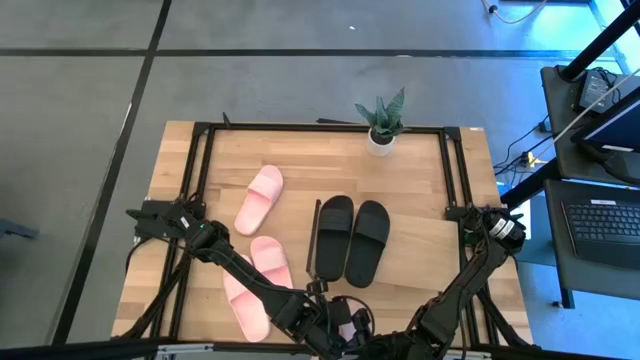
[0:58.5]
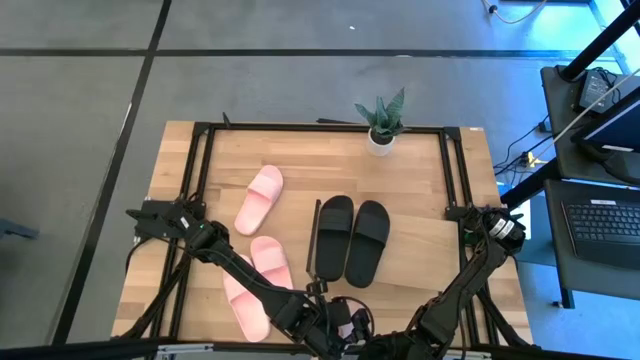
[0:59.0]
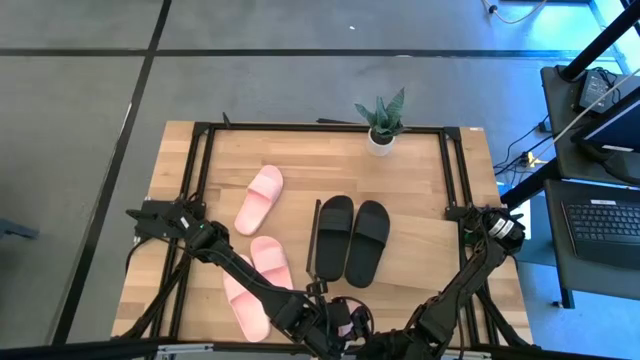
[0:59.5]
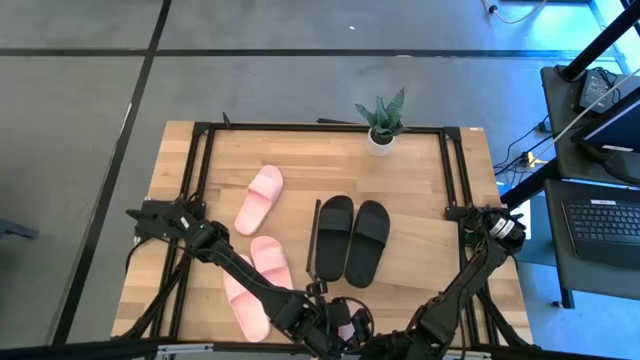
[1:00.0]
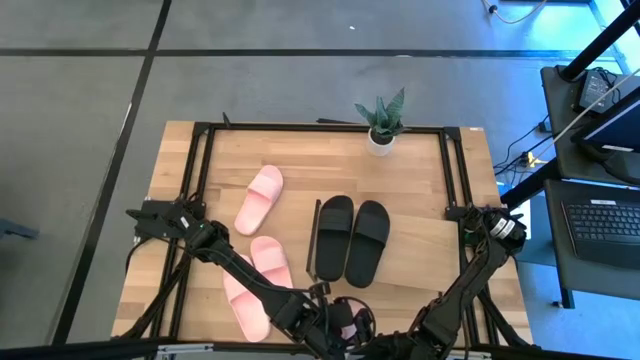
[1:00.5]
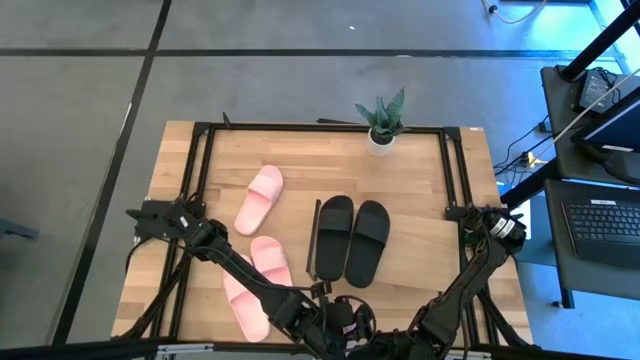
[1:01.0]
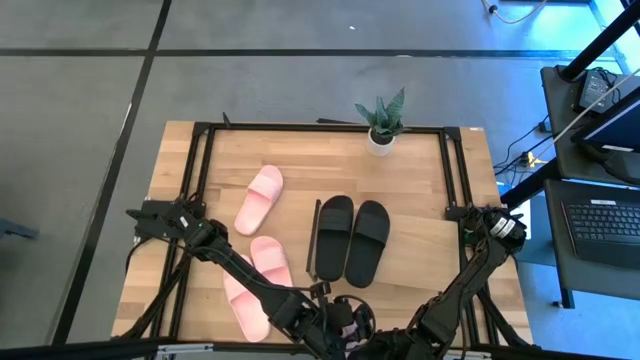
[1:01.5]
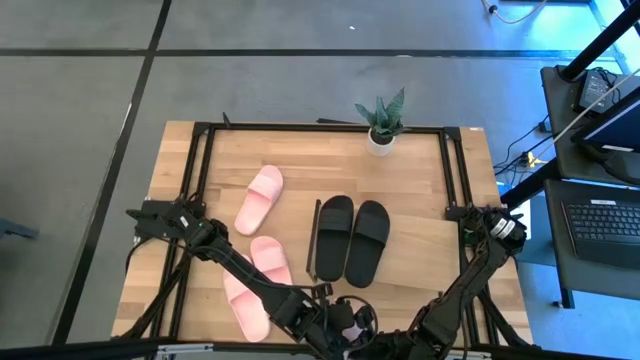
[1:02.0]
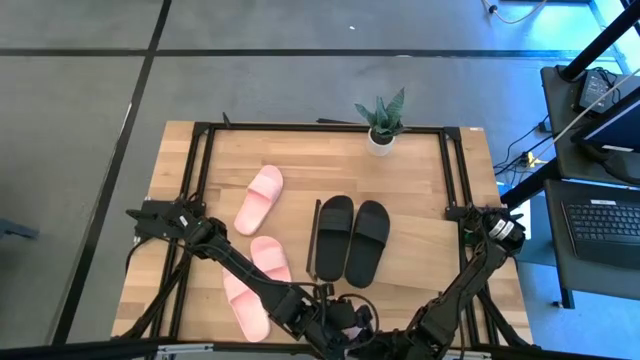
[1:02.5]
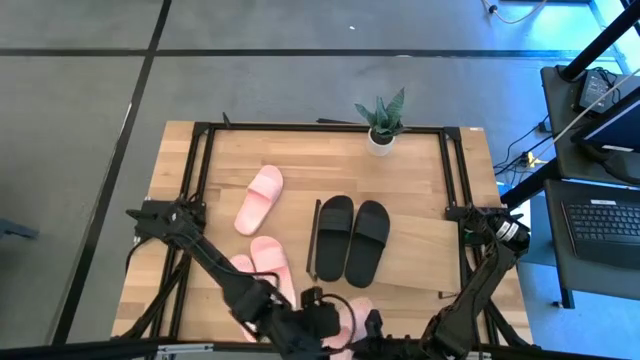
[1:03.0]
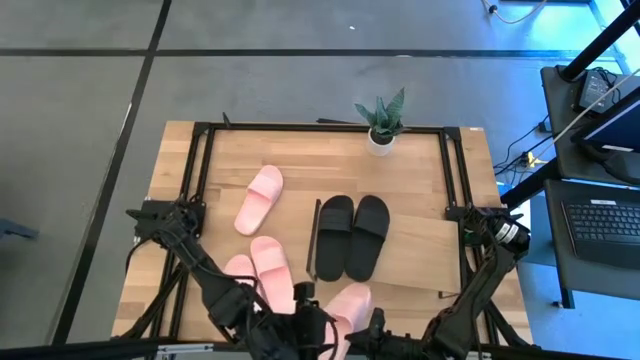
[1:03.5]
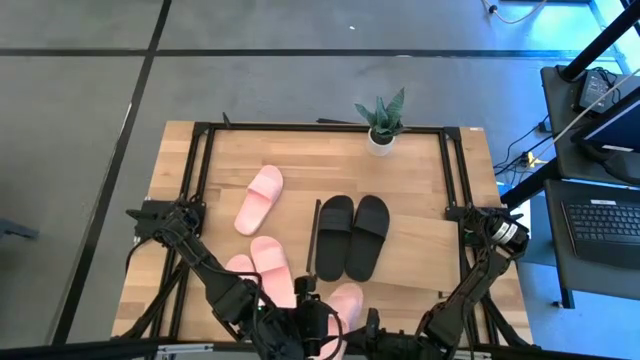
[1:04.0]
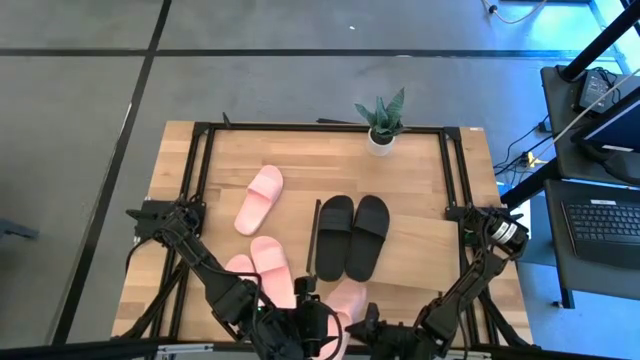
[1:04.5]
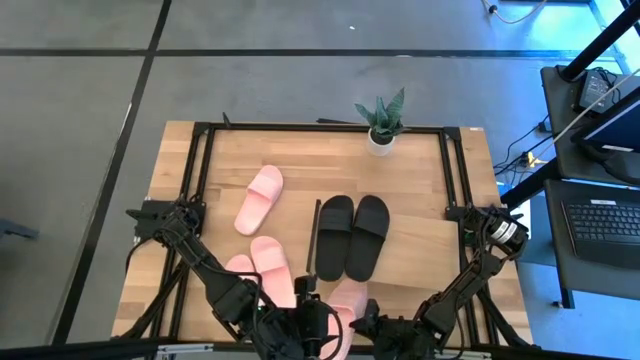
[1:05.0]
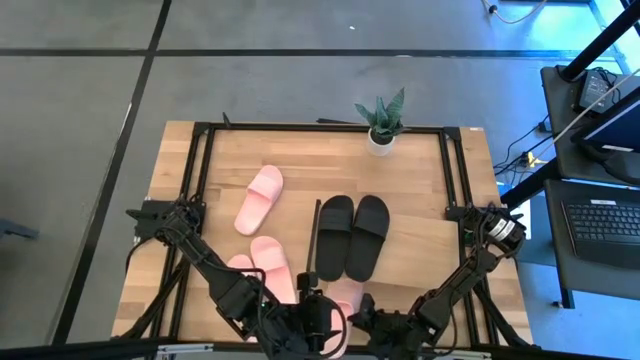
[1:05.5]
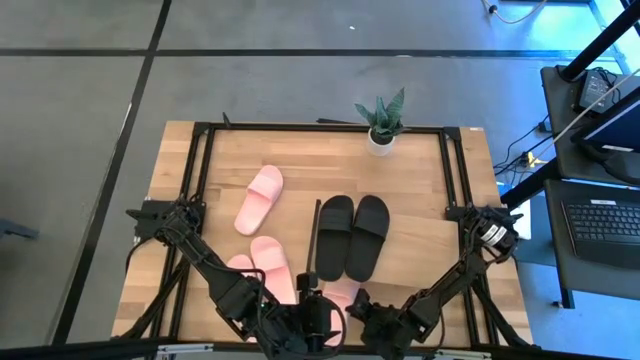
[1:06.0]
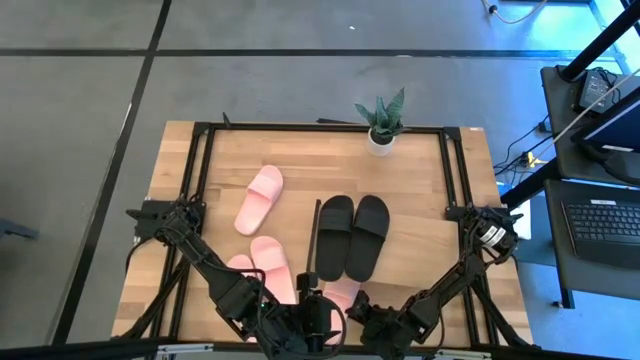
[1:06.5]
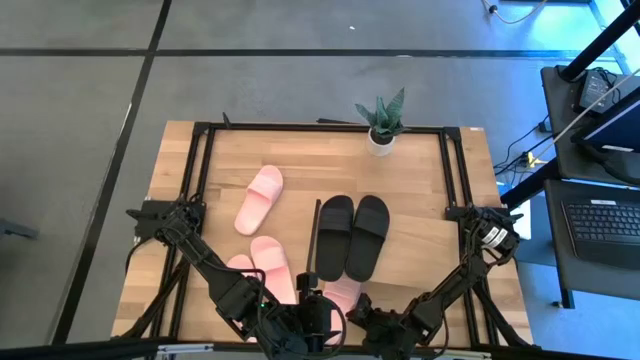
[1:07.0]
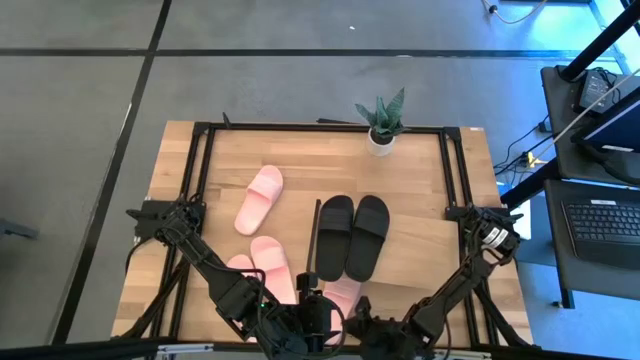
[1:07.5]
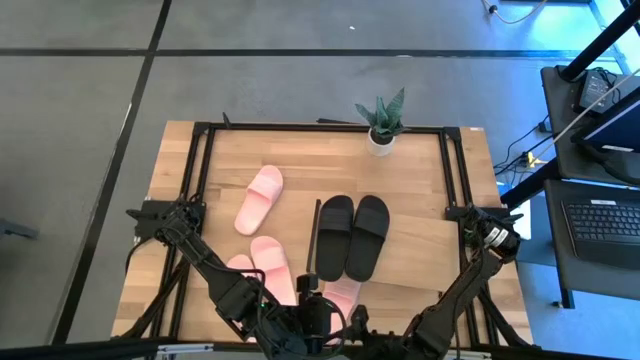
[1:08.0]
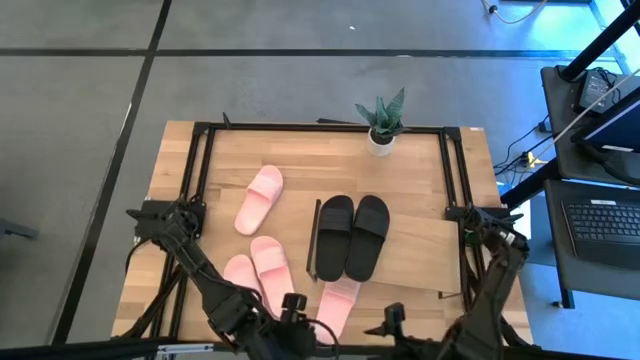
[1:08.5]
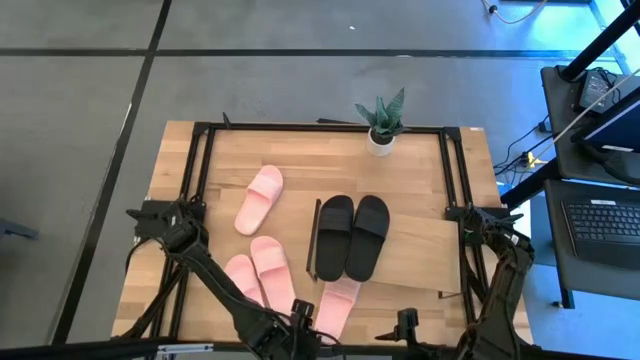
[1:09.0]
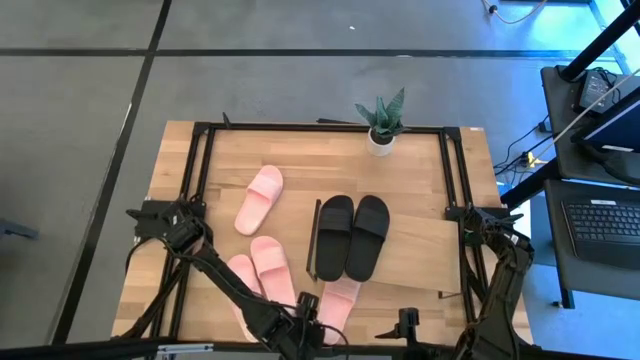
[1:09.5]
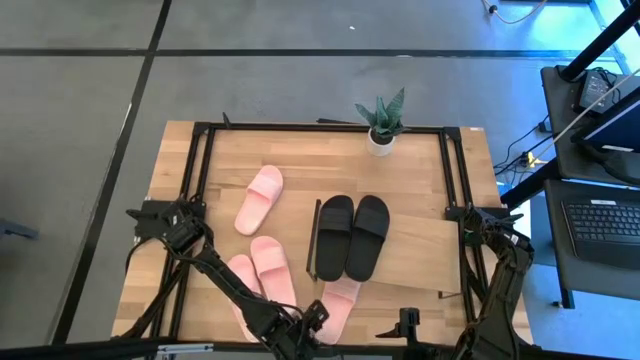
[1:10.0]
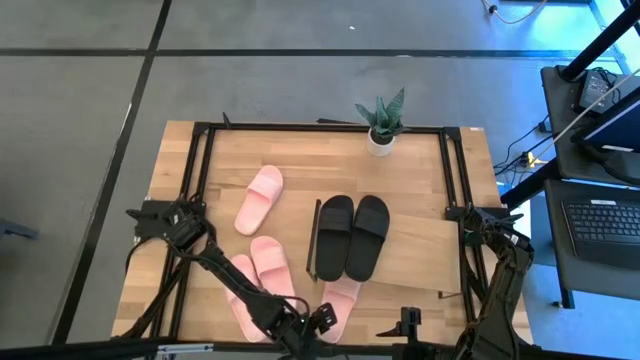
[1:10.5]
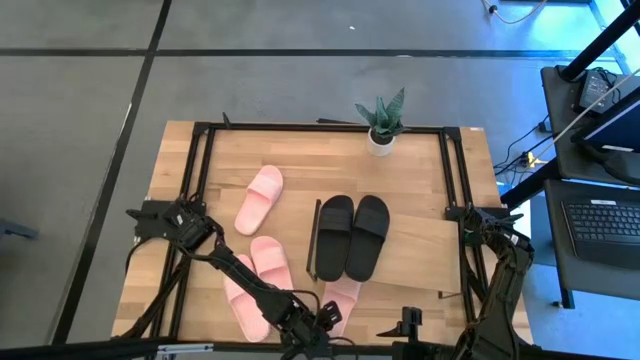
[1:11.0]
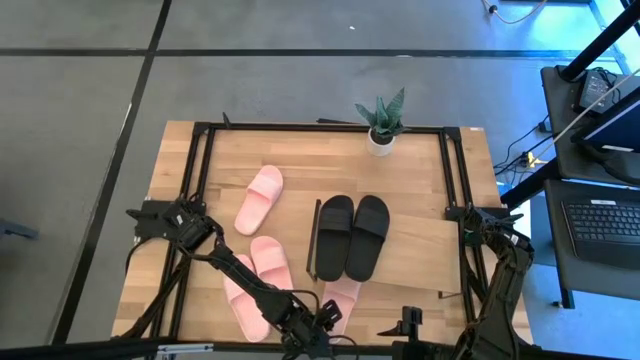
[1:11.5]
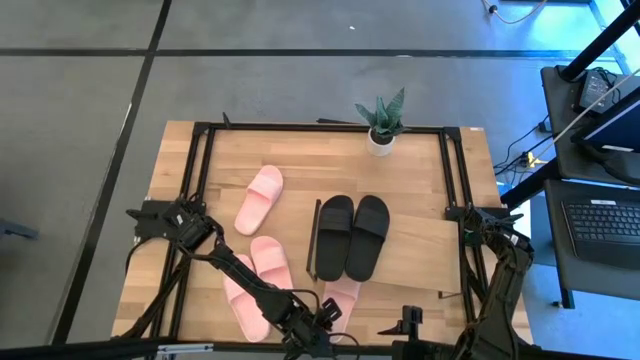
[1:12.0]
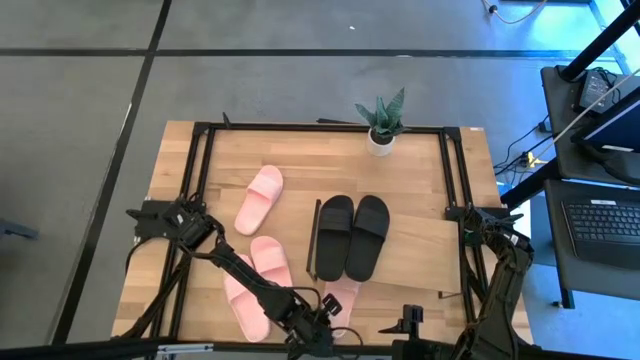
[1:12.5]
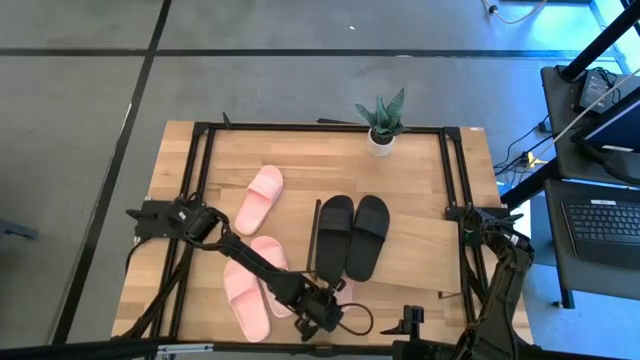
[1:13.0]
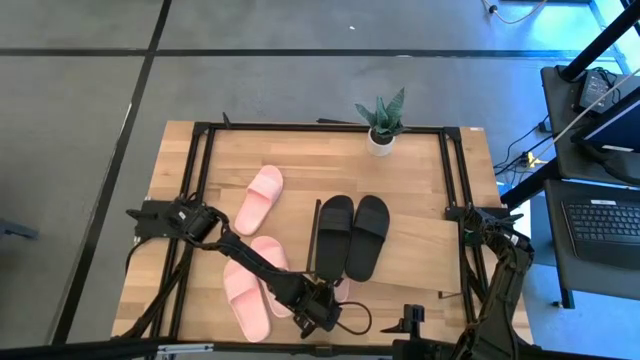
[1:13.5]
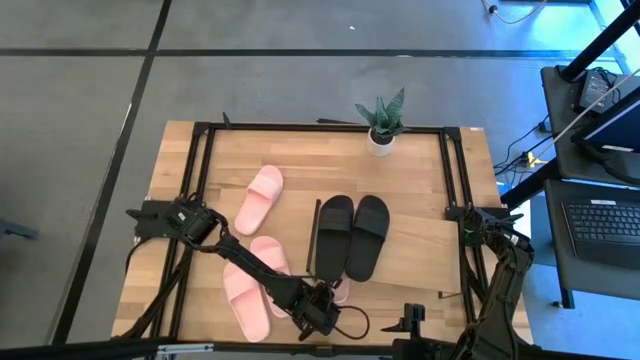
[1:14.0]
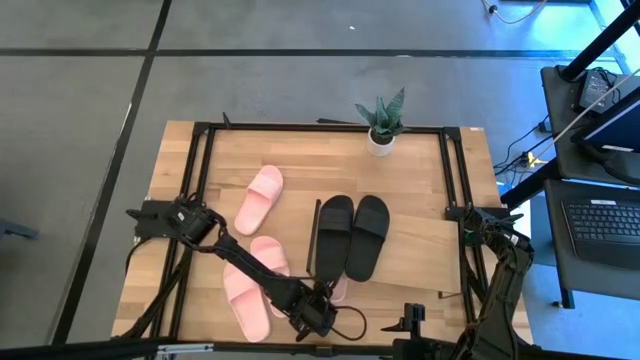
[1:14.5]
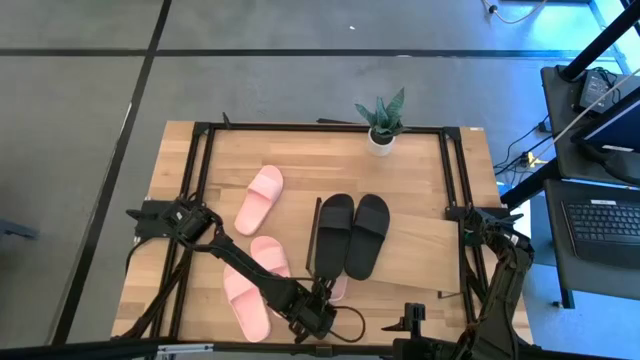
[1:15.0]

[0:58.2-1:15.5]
Task: Pick and place slides into the shelf
Put the top left pink slipper under the shelf

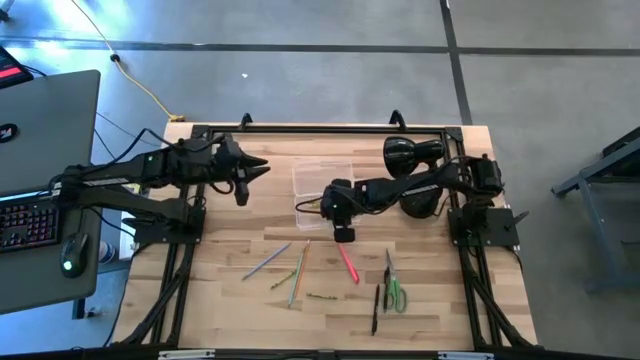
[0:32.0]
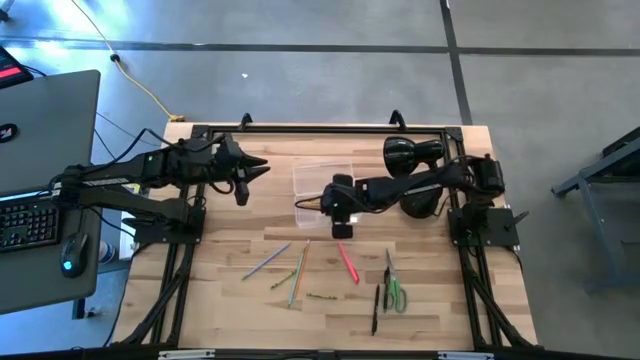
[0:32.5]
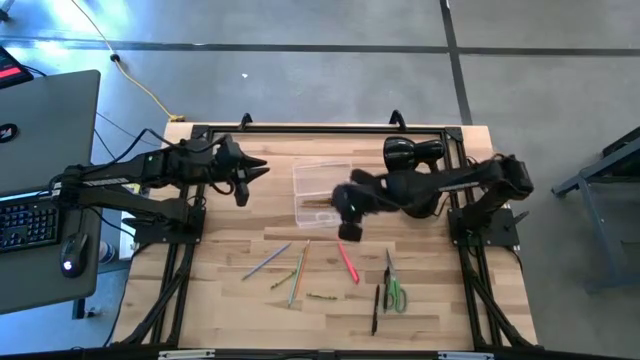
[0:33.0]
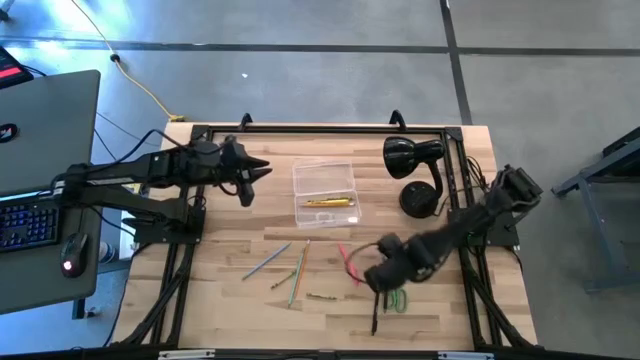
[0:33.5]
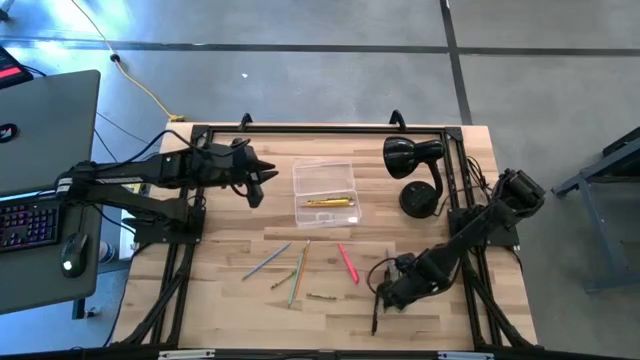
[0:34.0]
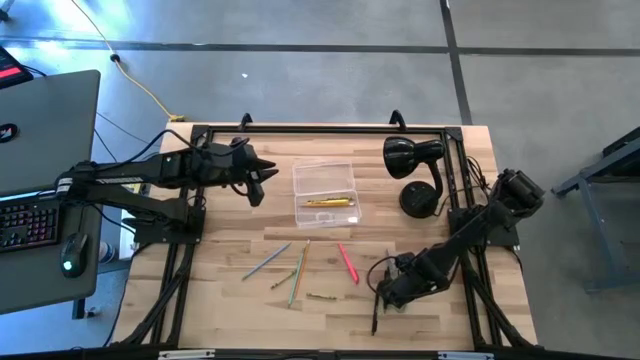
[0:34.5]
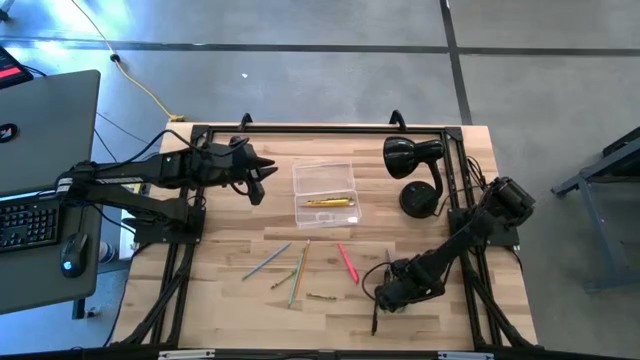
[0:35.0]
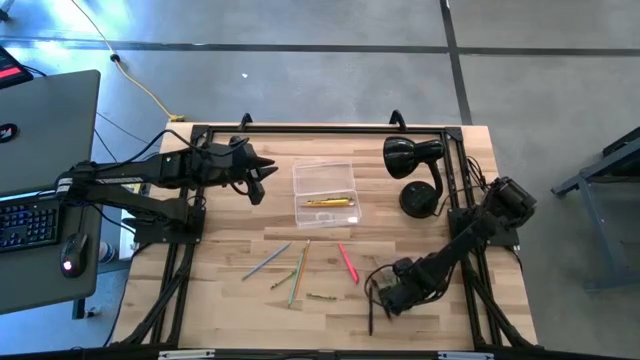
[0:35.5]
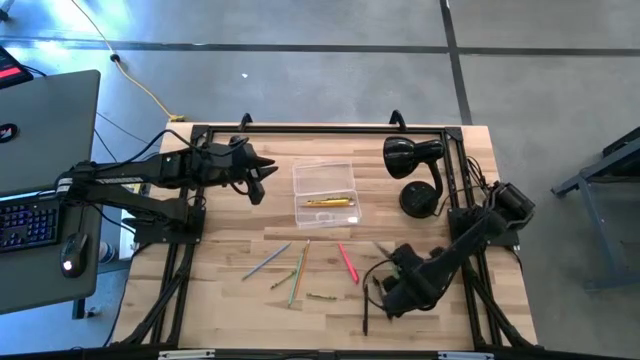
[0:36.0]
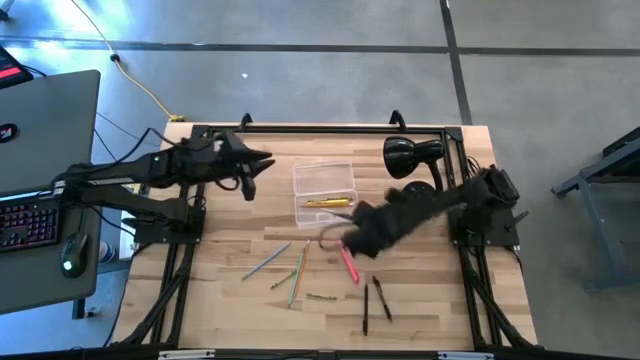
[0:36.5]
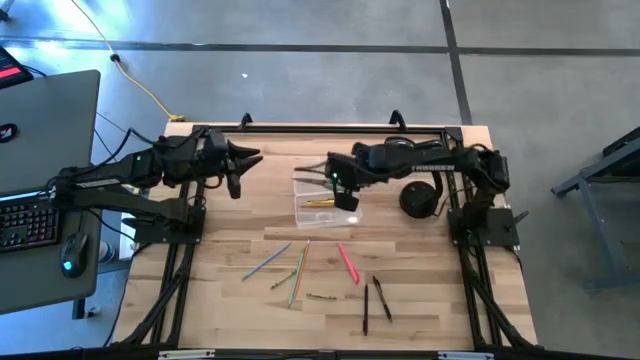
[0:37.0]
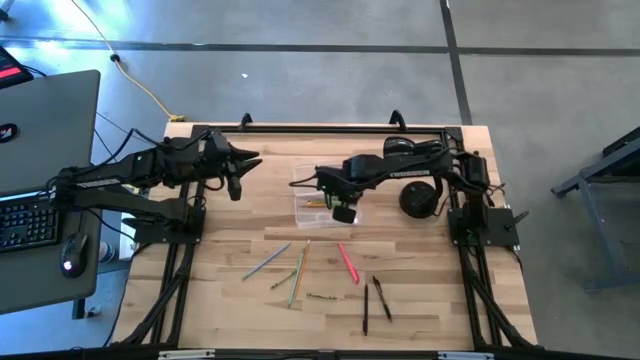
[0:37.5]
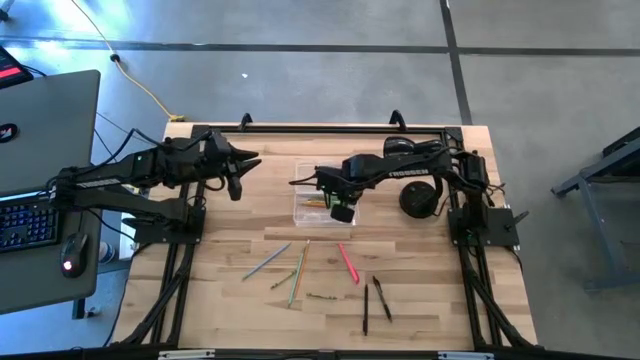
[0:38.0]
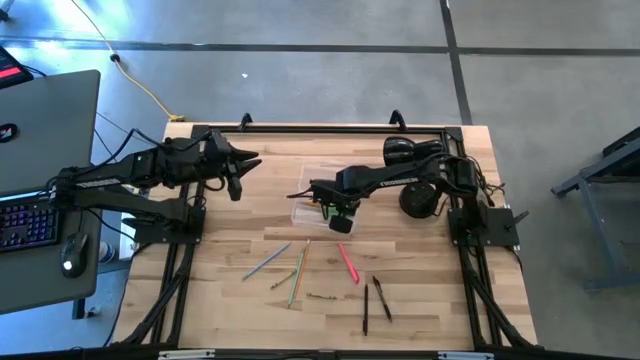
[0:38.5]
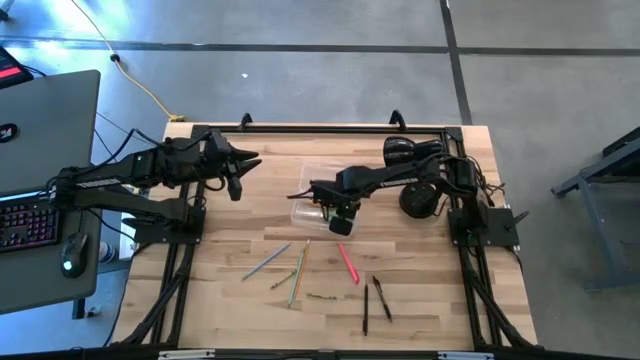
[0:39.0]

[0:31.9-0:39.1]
Task: Pick & place school supplies into a supply box
Put the green scissors into the transparent supply box
